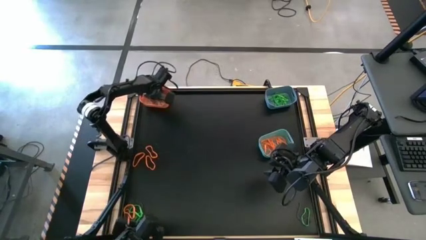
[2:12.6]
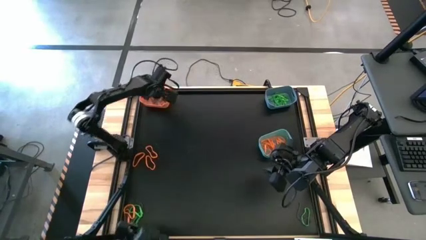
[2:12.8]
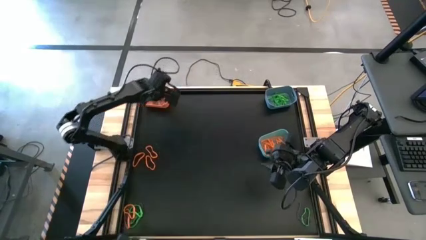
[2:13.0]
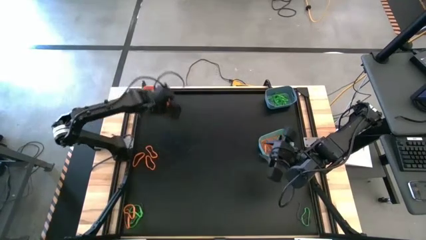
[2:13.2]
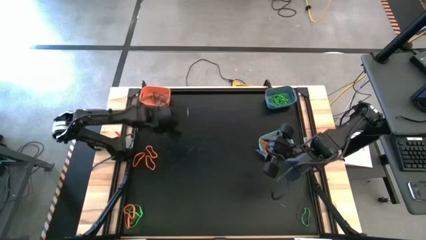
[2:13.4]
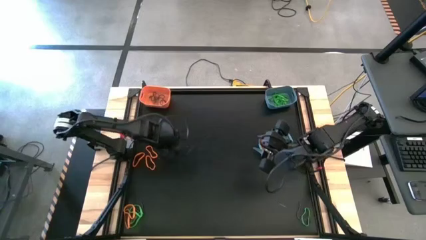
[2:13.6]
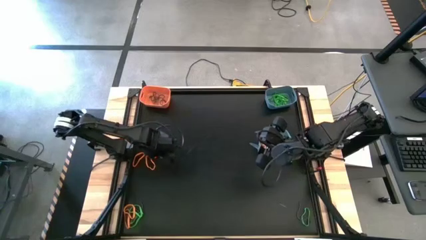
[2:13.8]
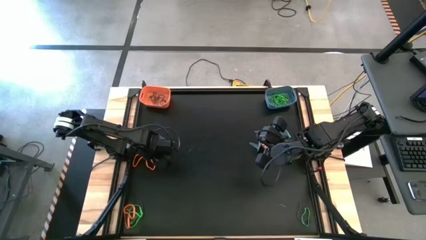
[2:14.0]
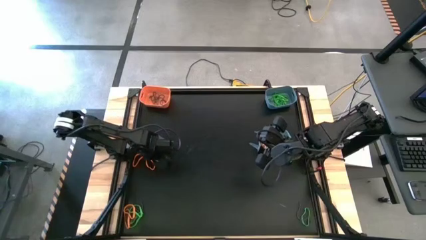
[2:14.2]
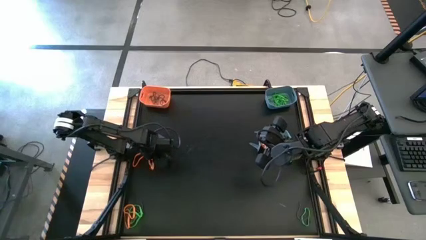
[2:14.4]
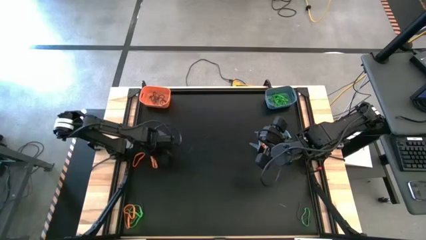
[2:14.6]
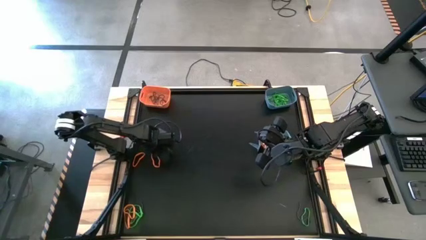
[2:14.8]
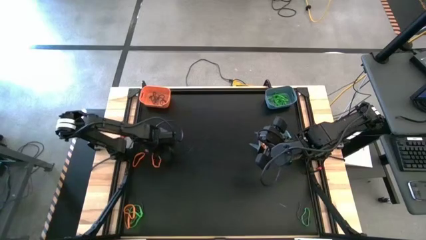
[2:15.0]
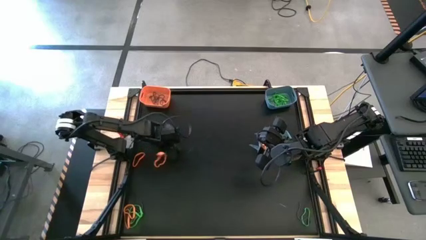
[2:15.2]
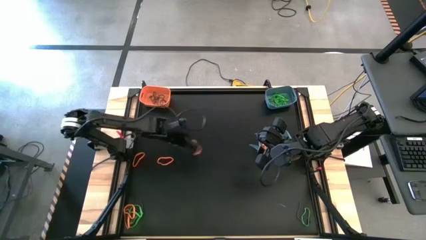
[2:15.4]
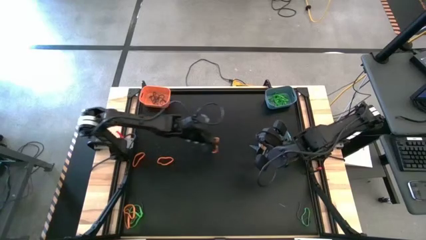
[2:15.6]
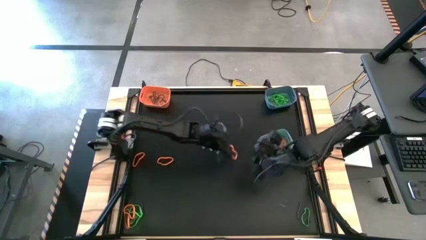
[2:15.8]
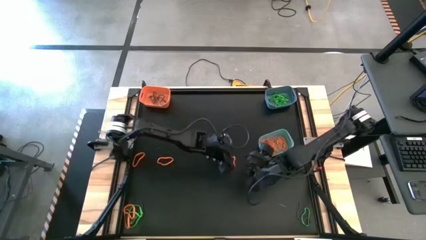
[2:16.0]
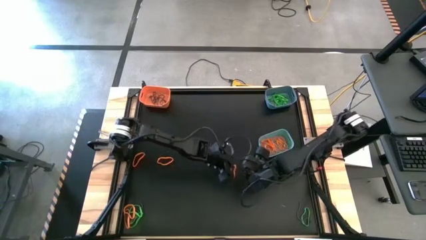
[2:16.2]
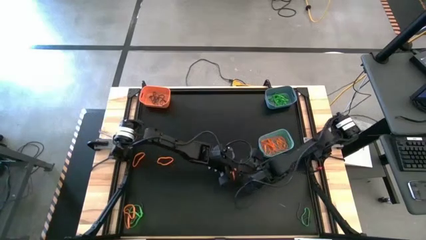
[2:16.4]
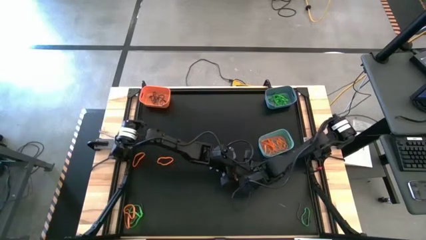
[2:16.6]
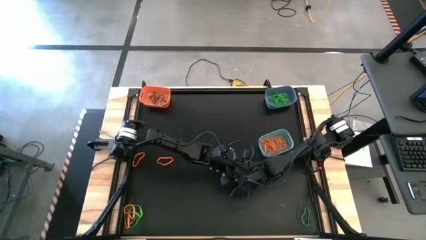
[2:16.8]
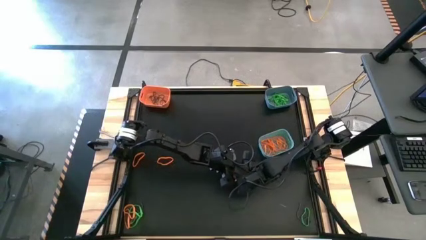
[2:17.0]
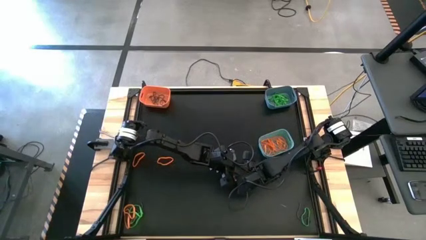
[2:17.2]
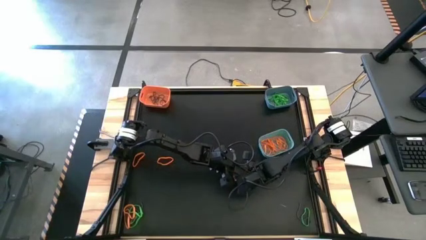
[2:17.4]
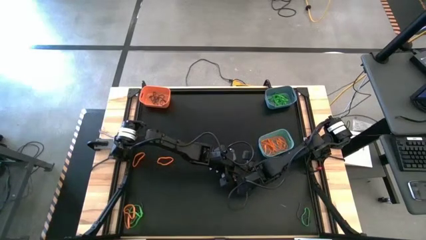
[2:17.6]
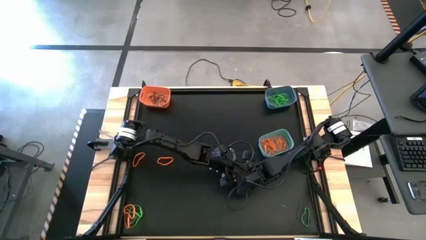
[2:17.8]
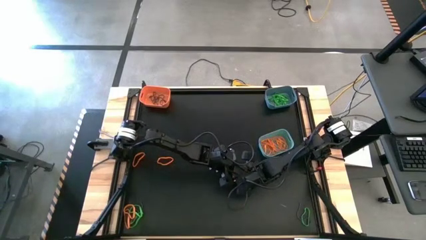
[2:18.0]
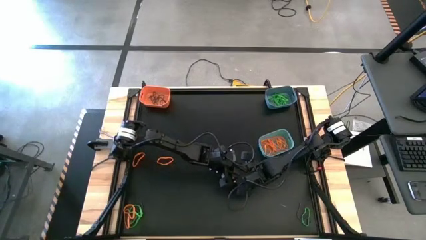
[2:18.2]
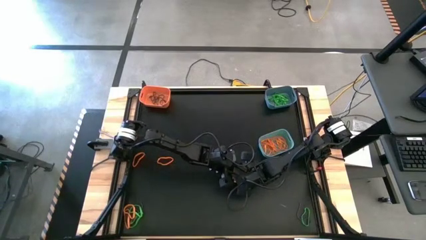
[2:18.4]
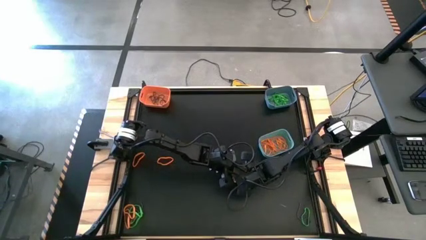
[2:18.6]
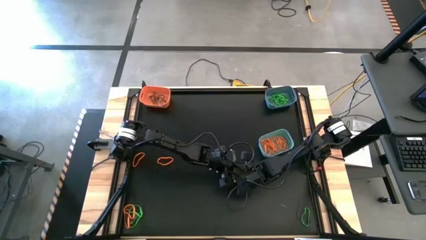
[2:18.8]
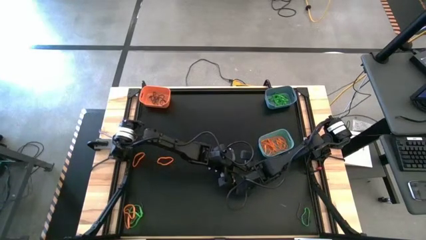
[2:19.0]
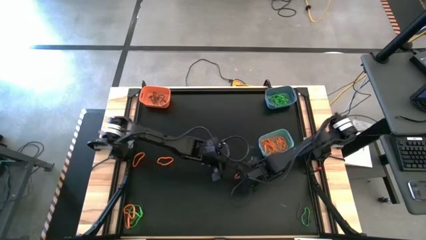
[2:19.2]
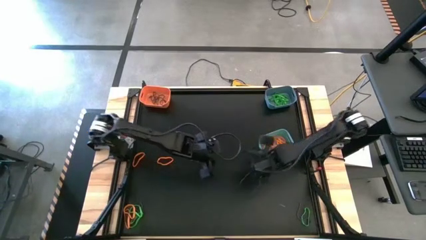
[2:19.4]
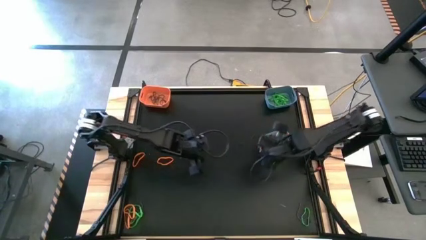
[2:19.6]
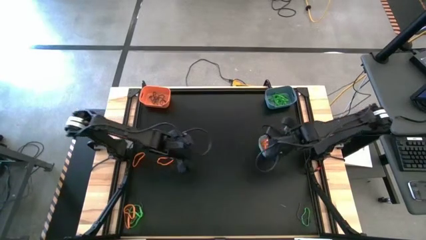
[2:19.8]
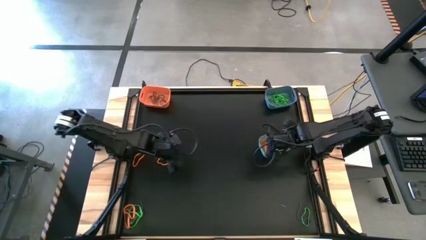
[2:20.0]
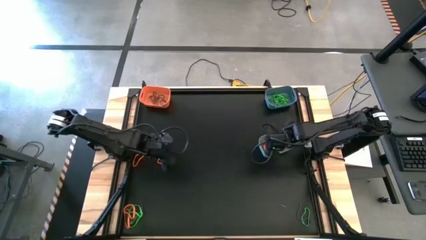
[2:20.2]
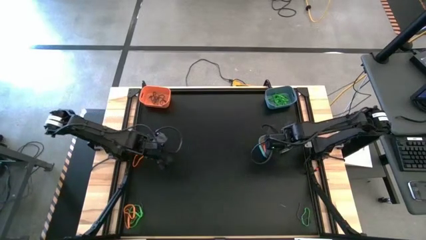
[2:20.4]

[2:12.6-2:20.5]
Task: Sort rubber bands into baskets
Put the orange rubber band into the green bin

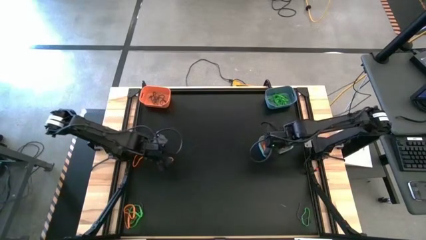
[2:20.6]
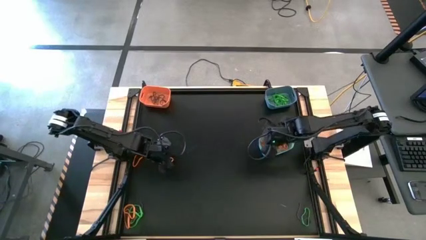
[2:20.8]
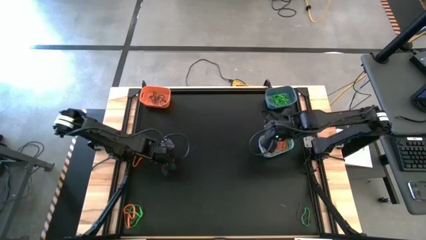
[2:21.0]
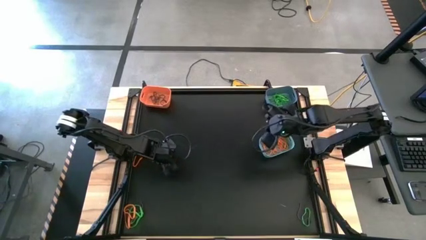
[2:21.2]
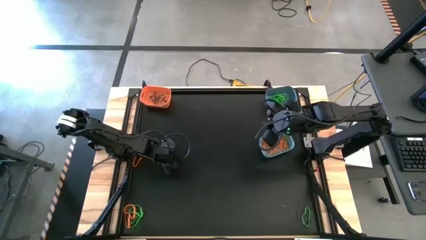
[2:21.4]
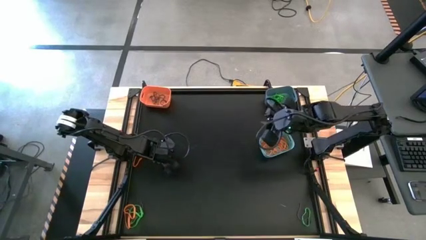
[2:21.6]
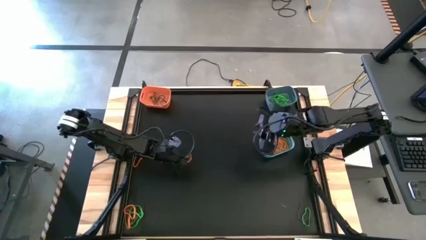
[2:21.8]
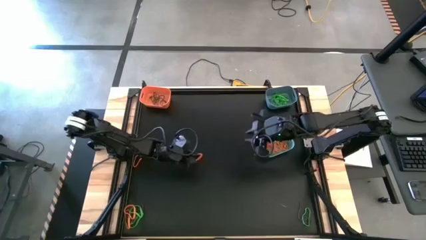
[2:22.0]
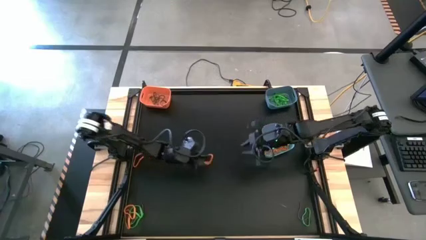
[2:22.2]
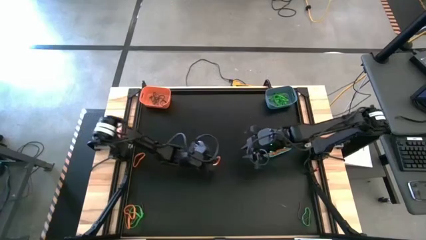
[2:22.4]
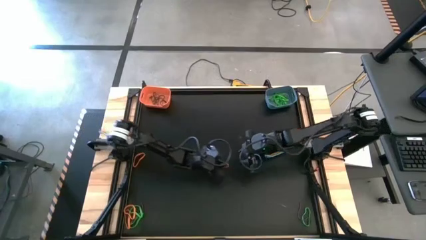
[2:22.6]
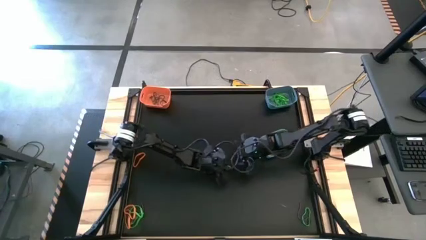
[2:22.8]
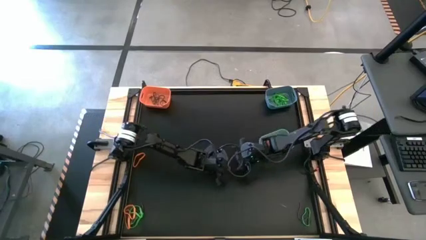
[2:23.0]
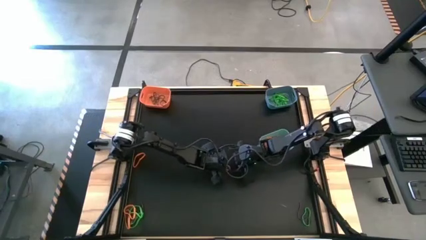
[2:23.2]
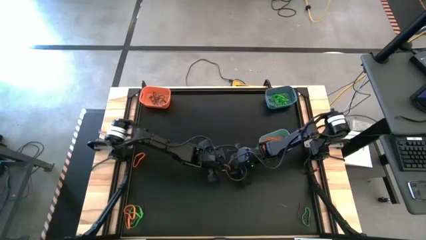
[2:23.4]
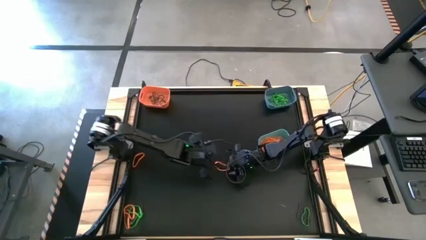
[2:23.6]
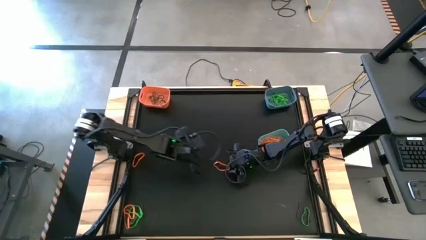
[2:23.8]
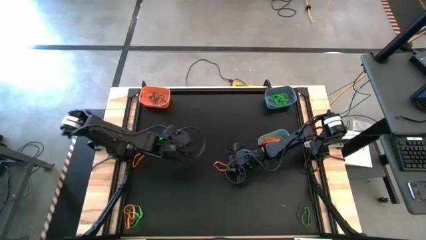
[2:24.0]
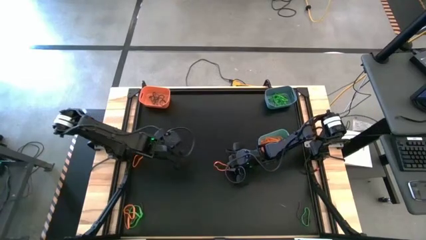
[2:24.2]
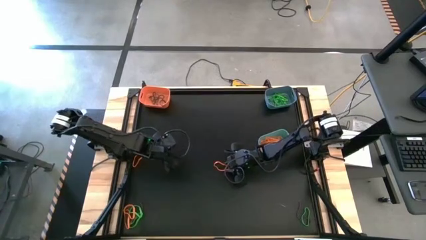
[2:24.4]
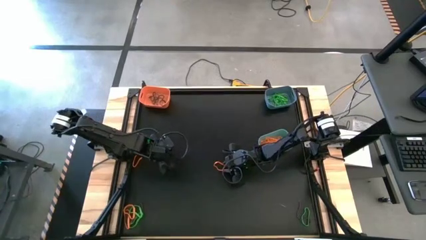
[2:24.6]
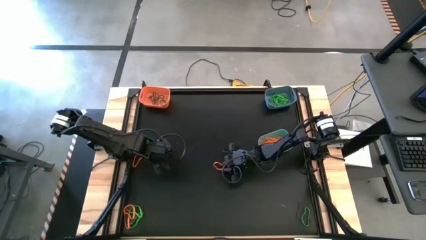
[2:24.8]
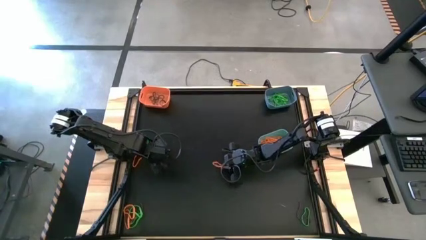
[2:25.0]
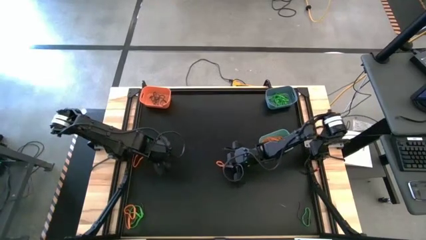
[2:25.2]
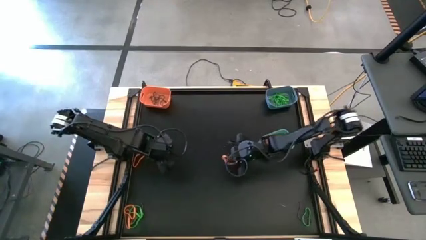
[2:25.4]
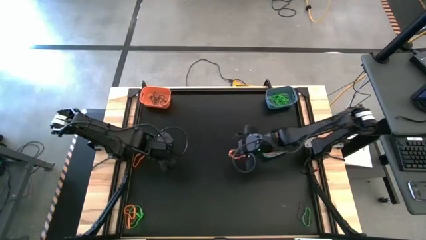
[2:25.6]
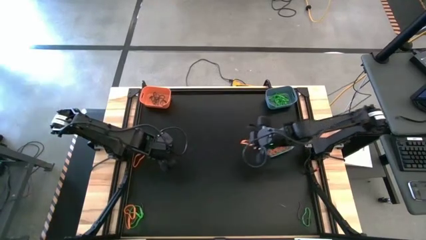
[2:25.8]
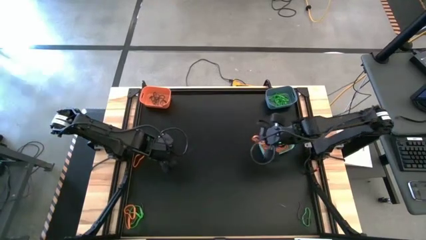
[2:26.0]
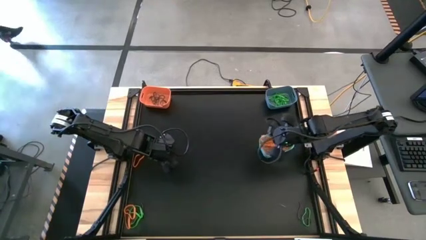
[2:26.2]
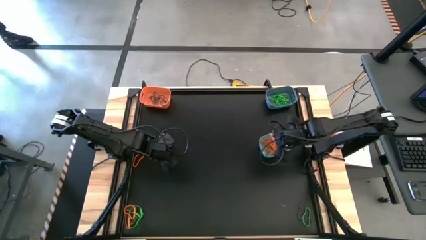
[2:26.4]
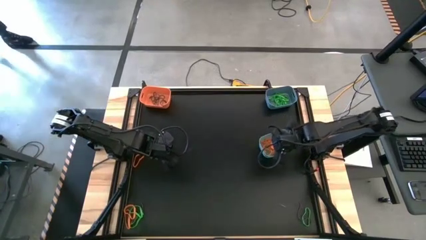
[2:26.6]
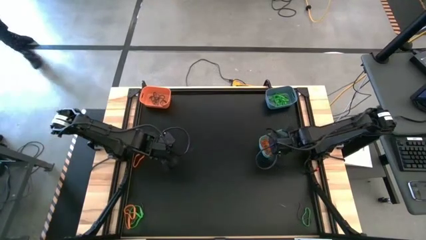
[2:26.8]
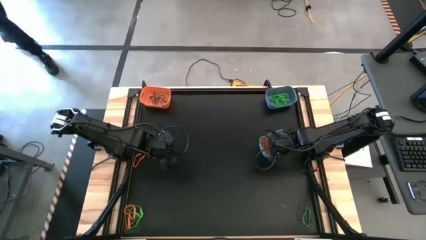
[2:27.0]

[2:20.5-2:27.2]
Put the orange rubber band into the green bin

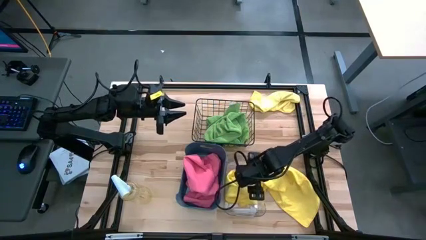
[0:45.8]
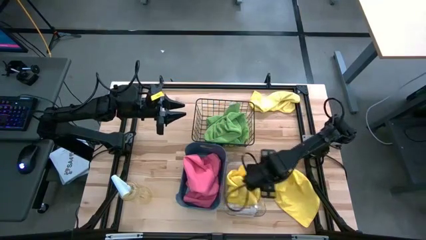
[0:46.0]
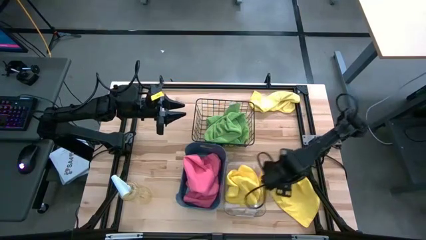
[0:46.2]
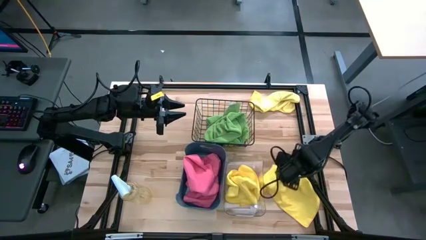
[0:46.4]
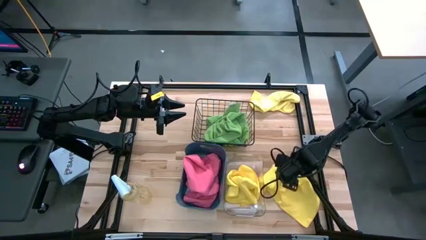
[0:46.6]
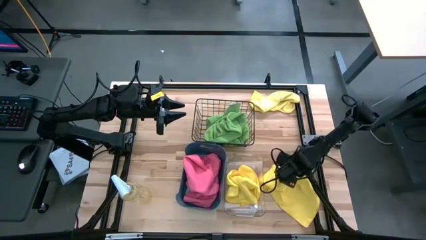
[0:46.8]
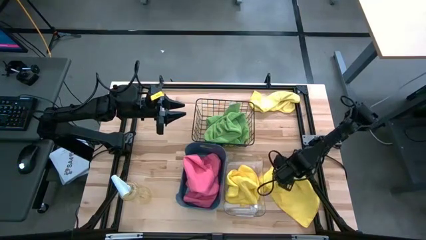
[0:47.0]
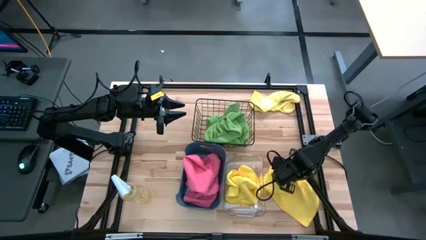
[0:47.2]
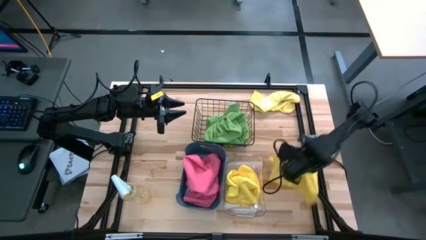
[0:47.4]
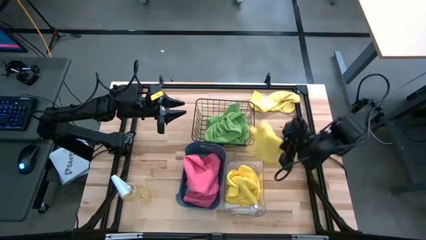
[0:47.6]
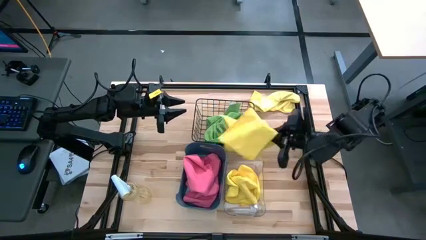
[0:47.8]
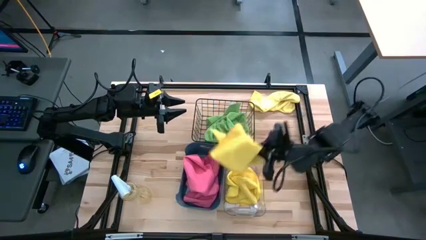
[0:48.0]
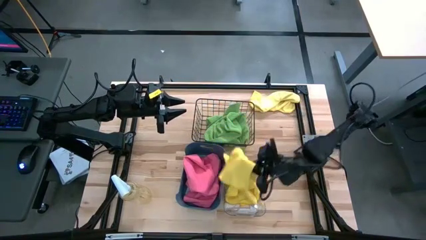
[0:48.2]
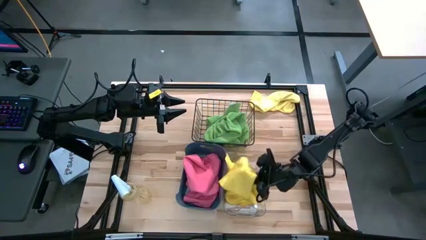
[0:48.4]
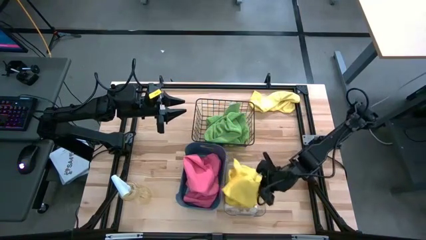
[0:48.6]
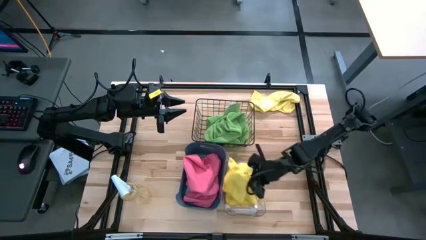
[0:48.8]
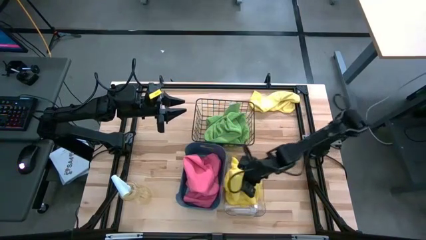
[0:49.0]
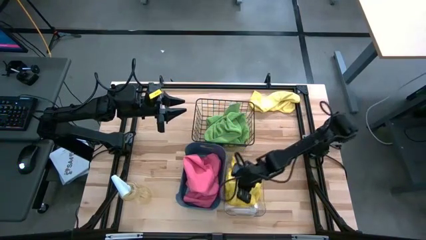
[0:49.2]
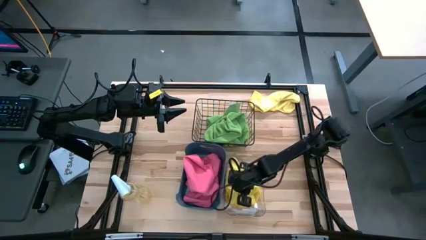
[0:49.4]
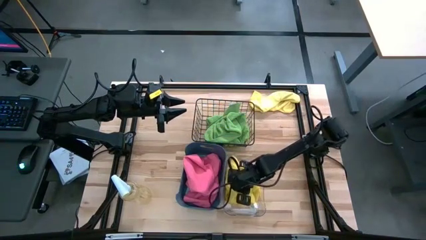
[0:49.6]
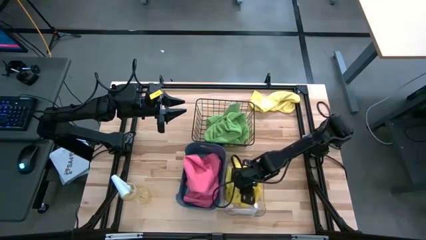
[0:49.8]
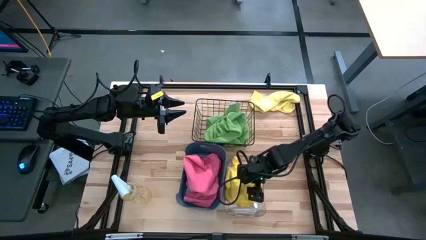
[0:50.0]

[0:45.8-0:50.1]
Task: Sort microfiber towel by color & place in baskets
Put the bottom yellow microfiber cloth into the transparent bin
